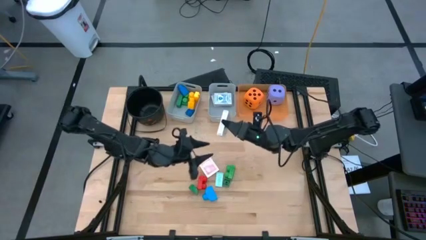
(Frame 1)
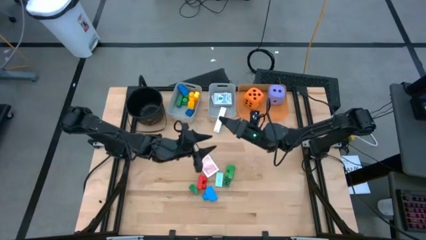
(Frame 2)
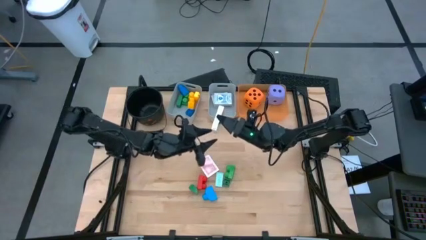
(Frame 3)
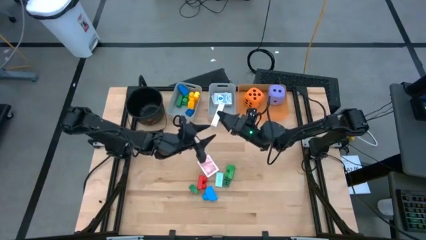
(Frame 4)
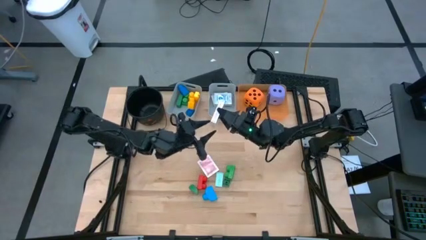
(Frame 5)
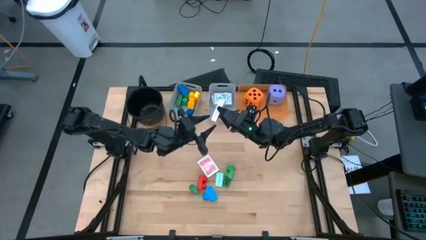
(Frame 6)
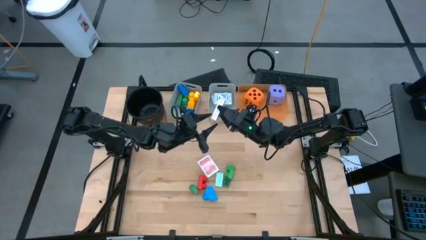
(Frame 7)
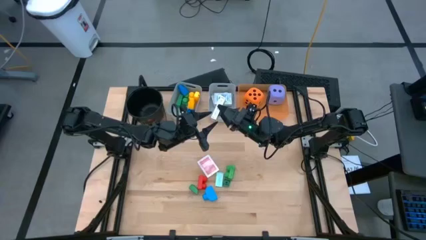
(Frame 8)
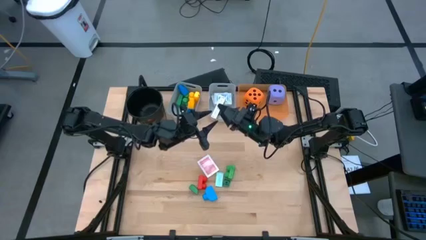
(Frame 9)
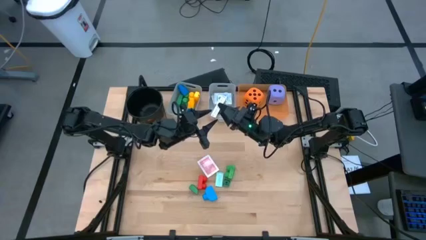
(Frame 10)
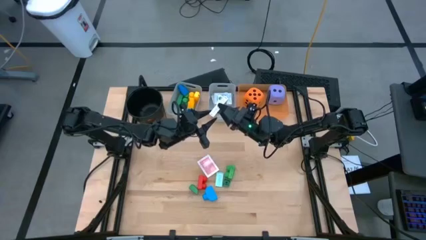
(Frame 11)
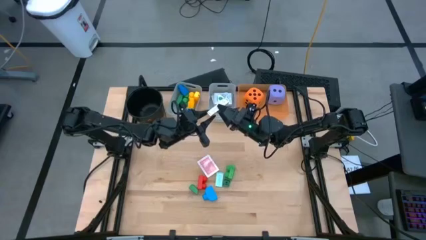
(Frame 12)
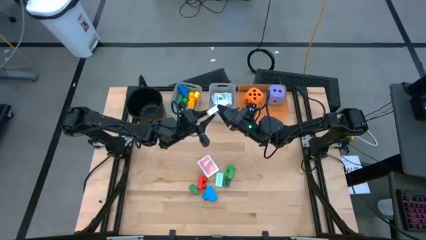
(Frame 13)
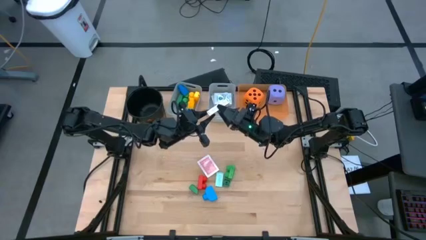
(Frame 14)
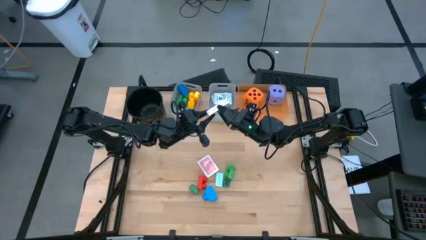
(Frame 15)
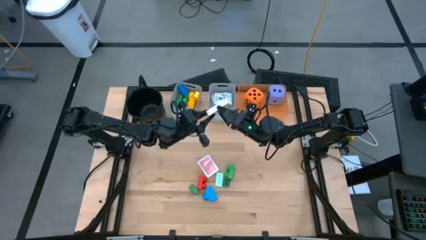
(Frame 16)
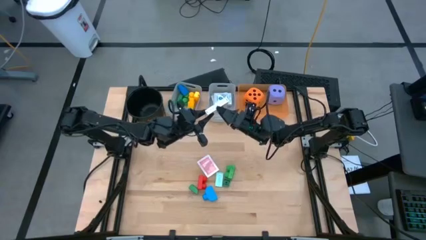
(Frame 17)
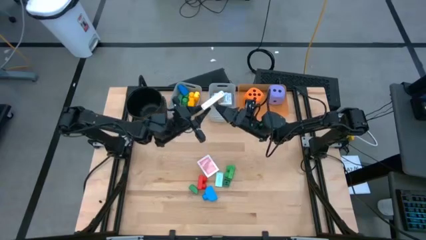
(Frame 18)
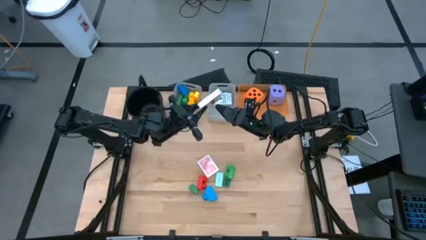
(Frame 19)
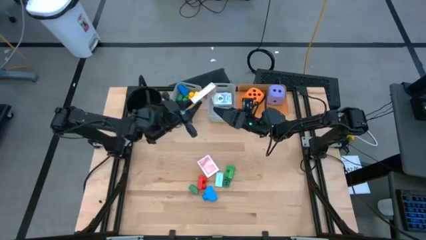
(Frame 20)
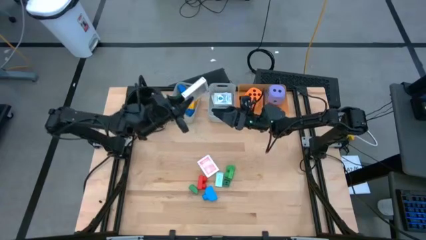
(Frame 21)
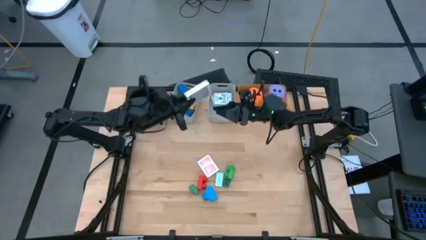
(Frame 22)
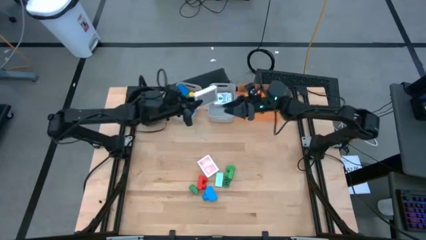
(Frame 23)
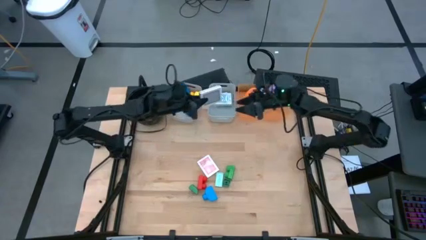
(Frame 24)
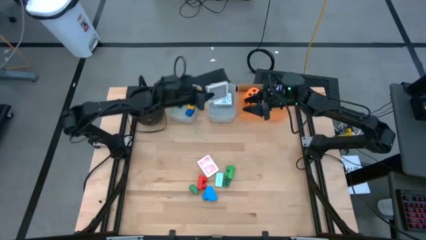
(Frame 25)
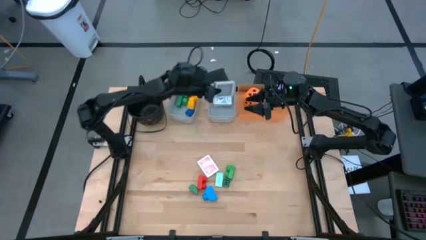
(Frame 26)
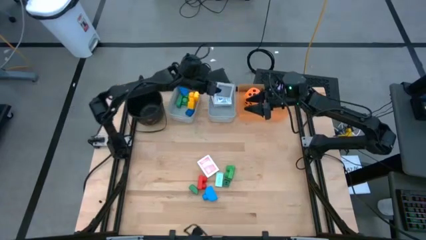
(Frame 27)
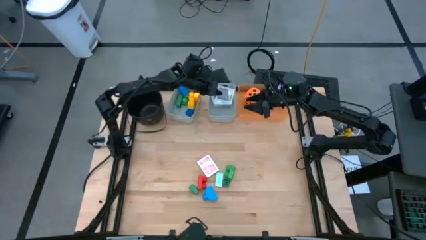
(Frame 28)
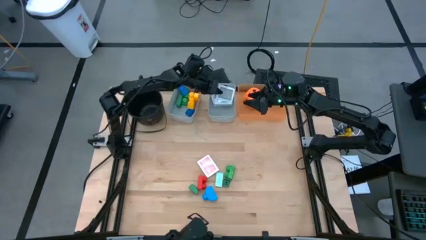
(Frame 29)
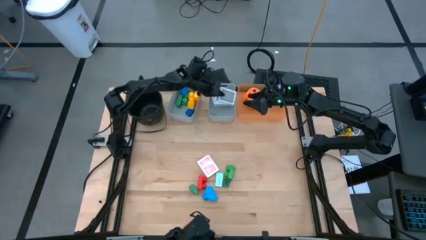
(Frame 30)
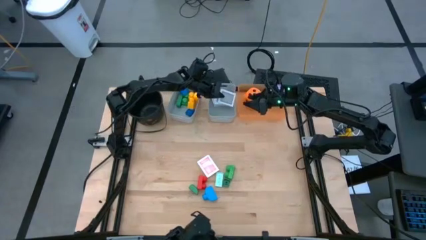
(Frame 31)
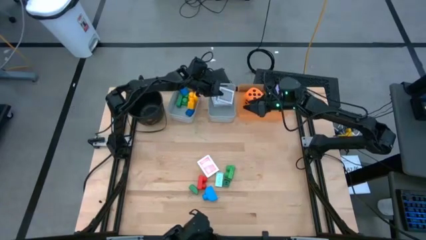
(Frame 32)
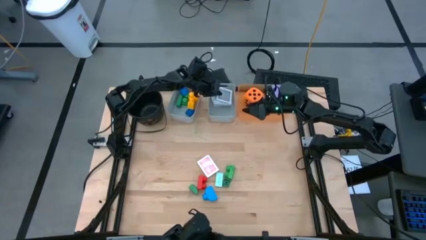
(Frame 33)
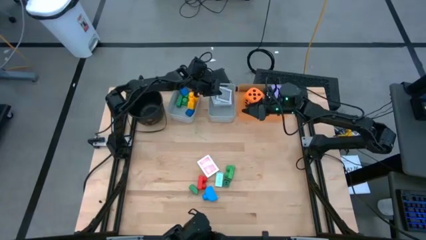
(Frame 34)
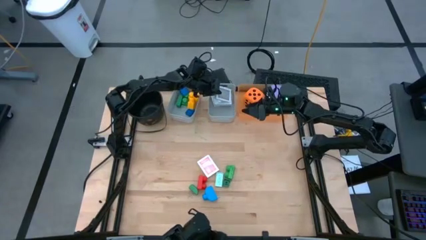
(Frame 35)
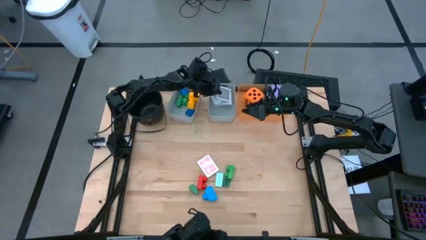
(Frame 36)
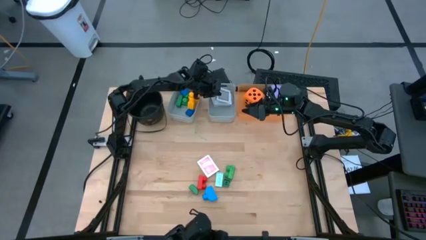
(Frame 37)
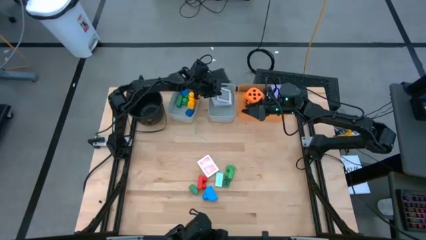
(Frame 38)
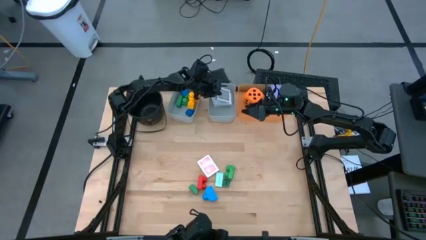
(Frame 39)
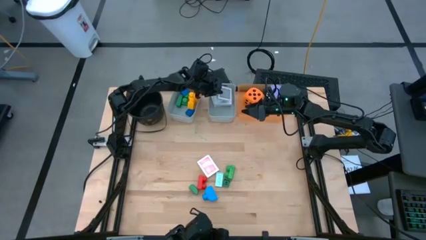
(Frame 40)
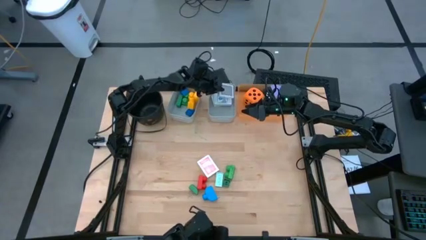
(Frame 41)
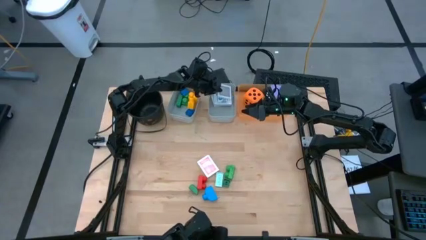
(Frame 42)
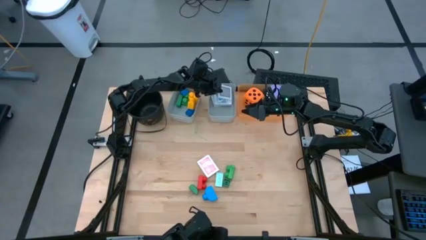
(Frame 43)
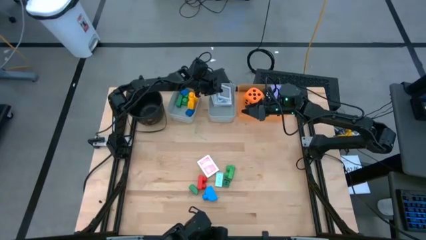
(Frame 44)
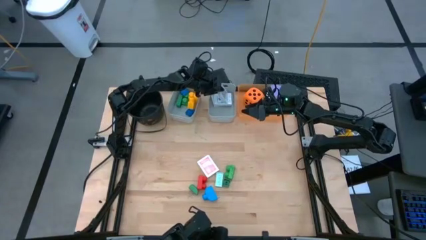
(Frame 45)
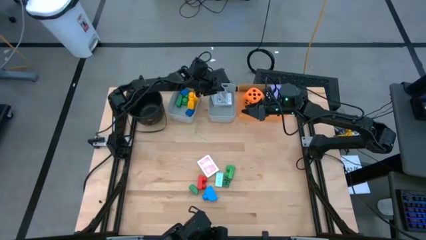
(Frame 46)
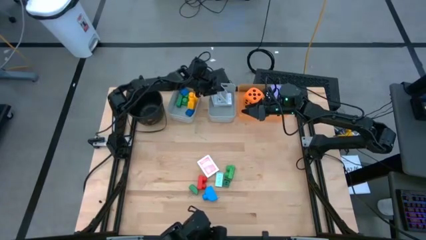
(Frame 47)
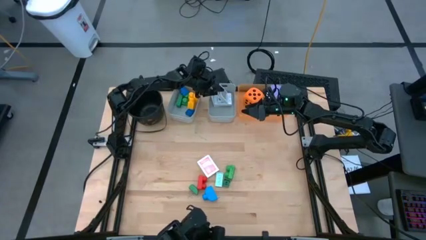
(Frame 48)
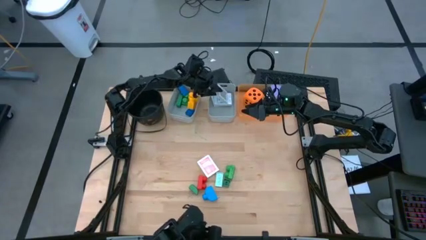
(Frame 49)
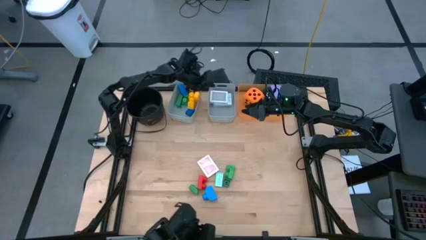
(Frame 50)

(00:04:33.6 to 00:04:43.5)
Task: Pick & Place Toys
Put the black deck of cards into the right gray bin

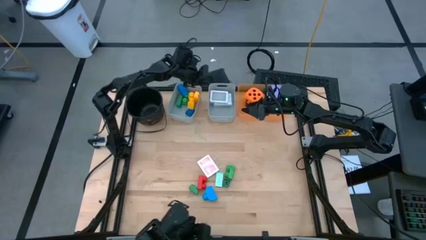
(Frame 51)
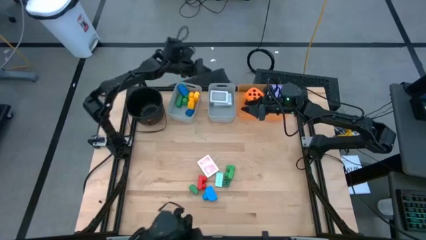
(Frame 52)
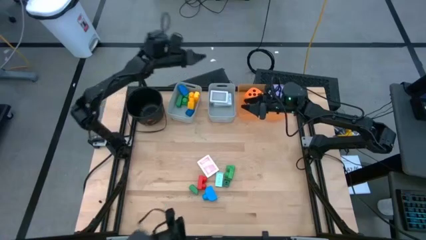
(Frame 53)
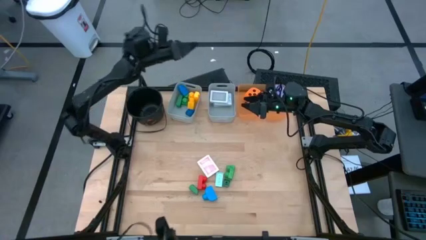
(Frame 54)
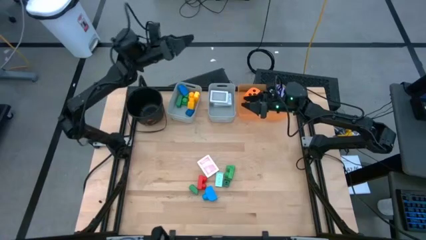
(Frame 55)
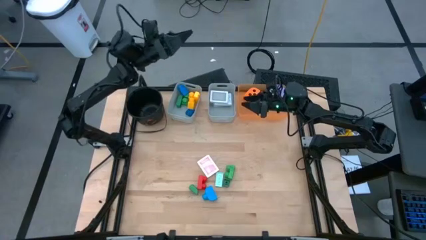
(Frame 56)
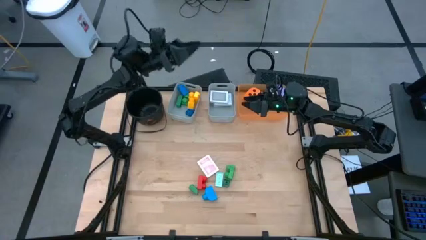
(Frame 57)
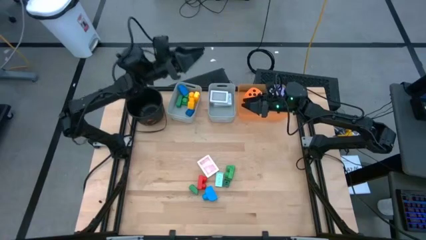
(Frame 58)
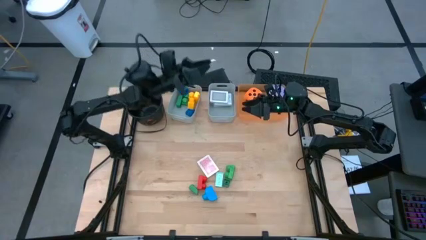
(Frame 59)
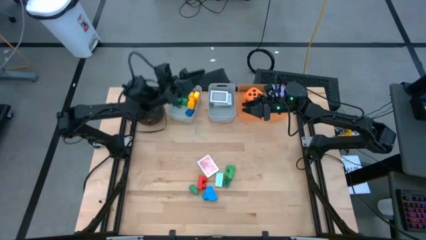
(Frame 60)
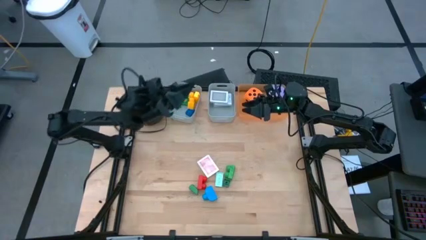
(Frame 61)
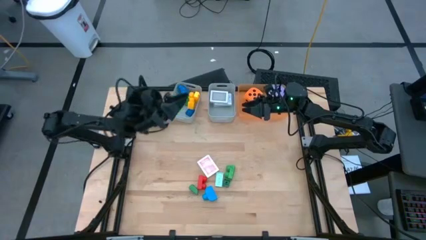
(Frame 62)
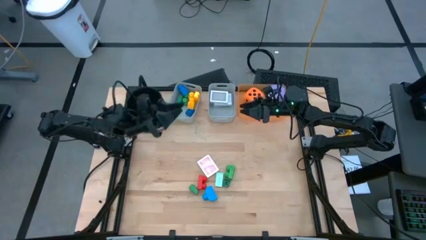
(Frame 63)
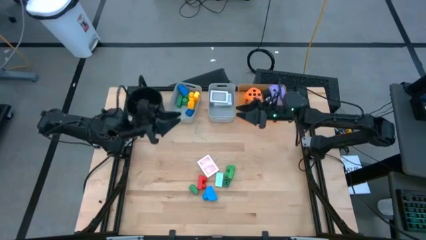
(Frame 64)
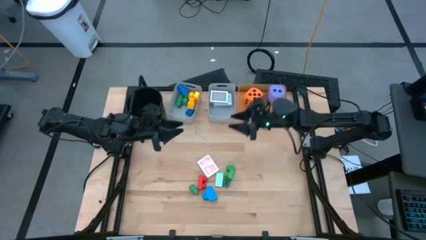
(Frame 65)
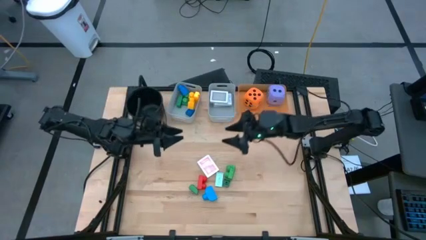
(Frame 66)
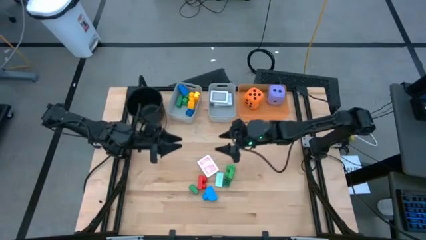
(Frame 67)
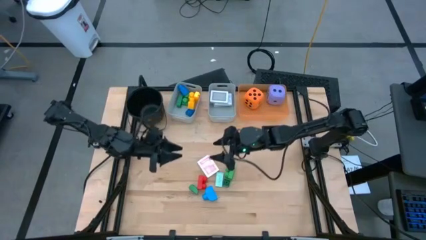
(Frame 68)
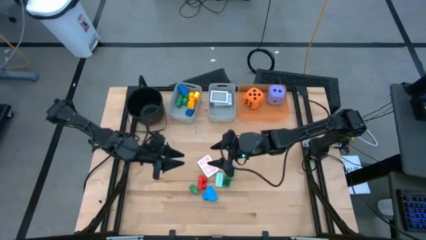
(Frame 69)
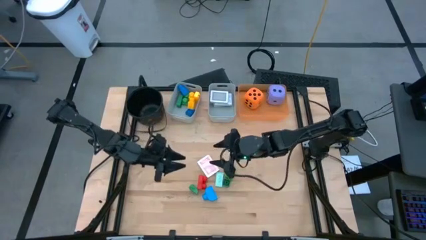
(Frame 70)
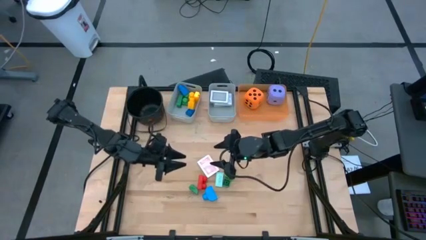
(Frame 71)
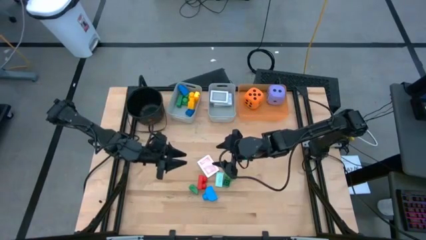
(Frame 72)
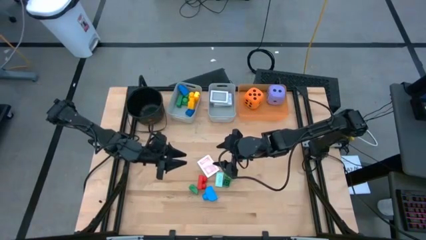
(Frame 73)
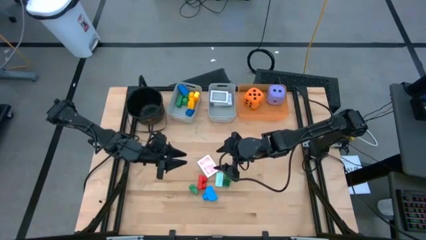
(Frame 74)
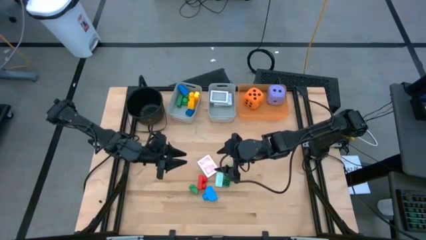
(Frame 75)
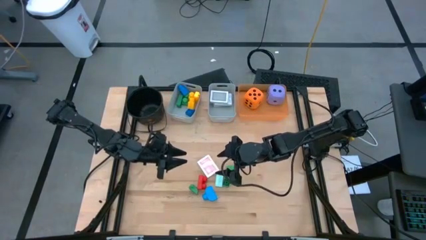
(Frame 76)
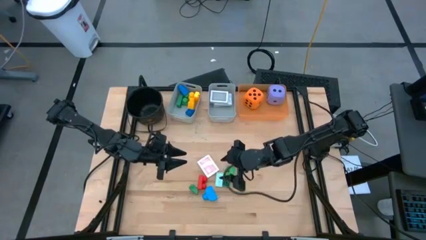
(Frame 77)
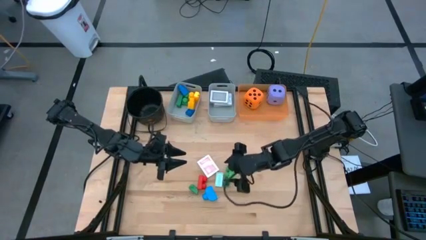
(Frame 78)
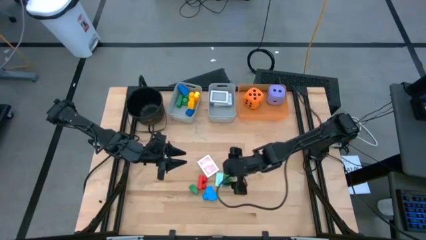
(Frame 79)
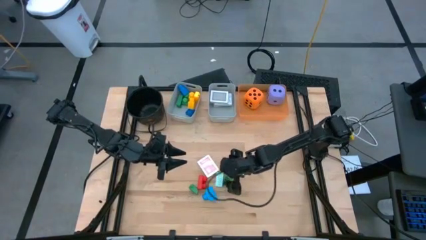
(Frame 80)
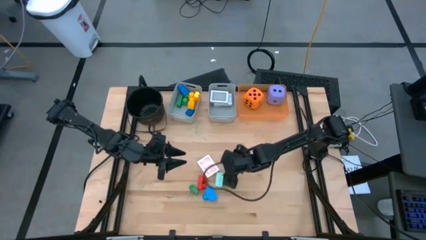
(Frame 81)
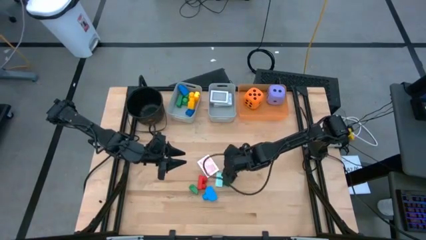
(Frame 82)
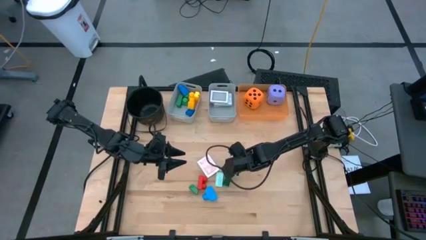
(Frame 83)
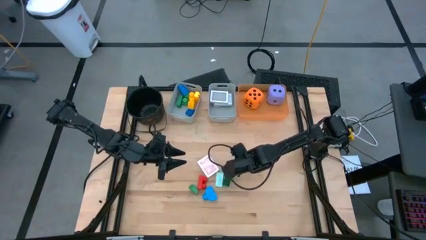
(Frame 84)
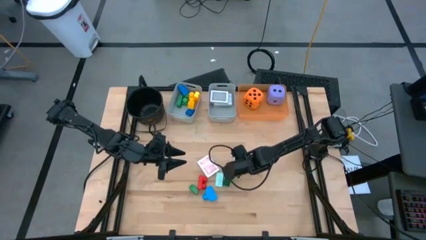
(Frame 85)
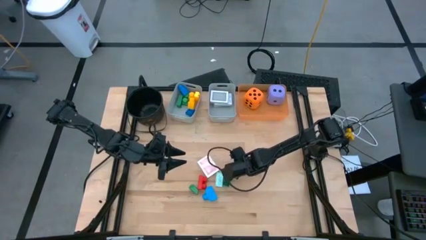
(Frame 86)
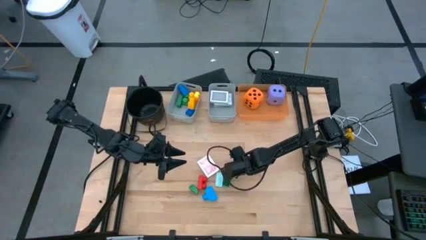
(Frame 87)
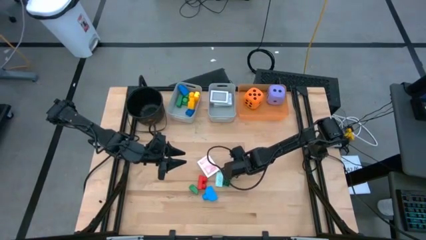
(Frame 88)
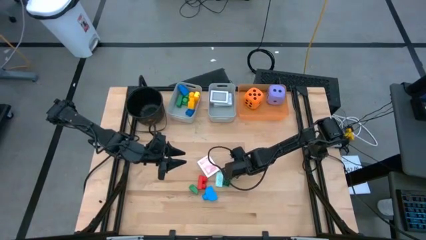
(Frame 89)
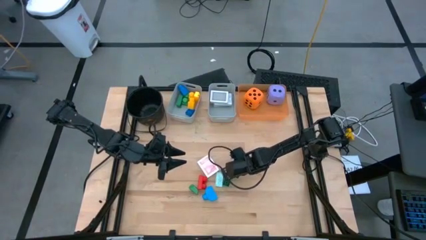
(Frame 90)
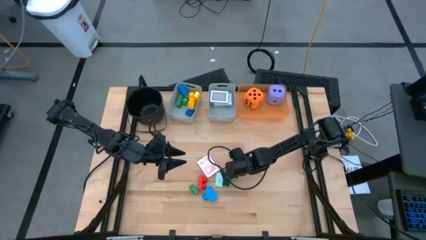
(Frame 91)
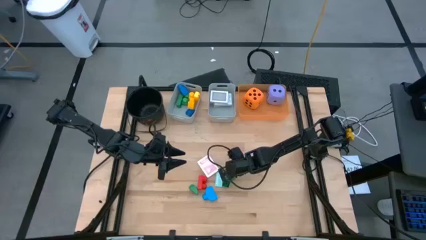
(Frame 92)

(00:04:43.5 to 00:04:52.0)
Put the green game piece into the left gray bin
